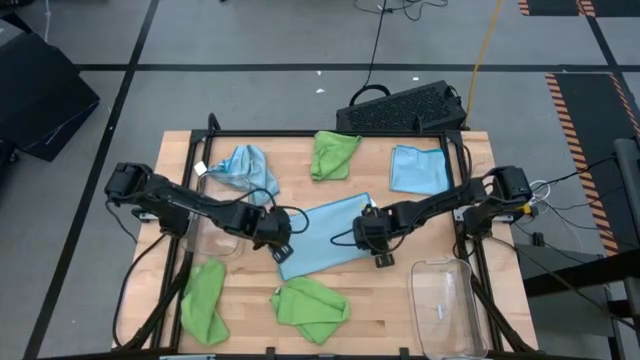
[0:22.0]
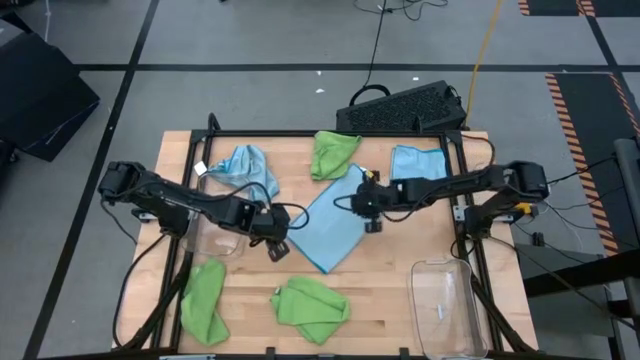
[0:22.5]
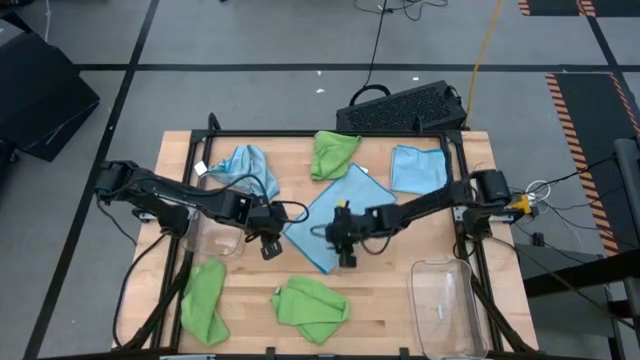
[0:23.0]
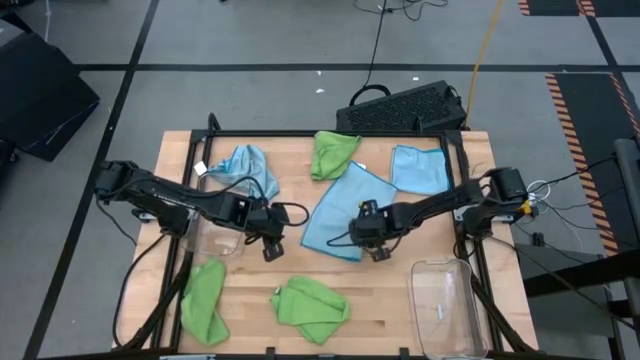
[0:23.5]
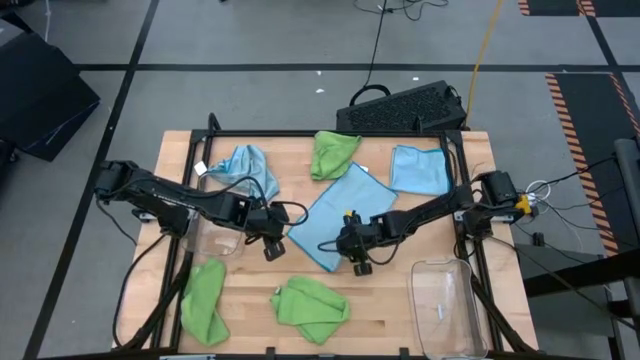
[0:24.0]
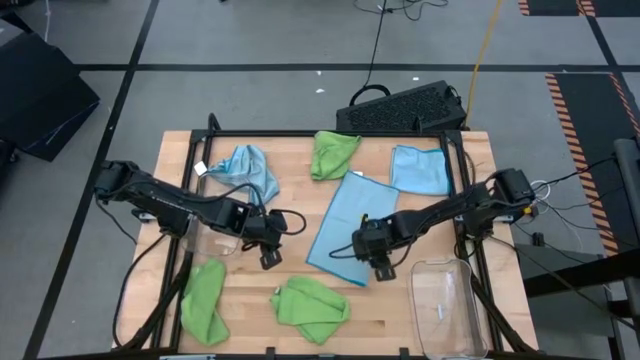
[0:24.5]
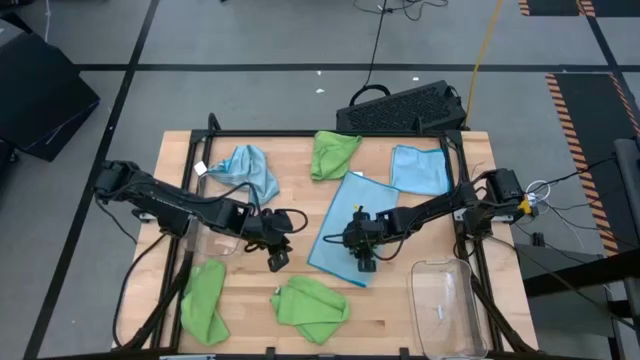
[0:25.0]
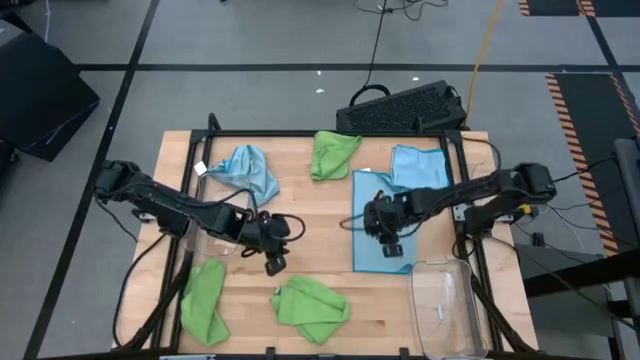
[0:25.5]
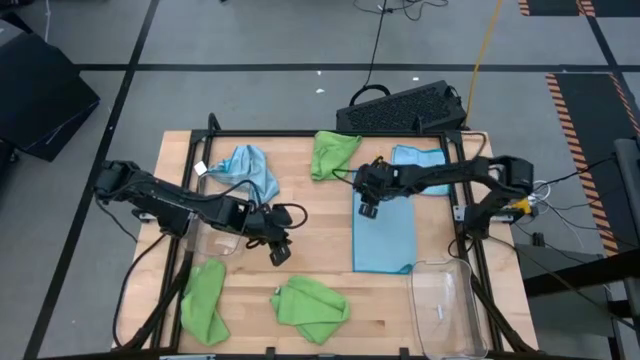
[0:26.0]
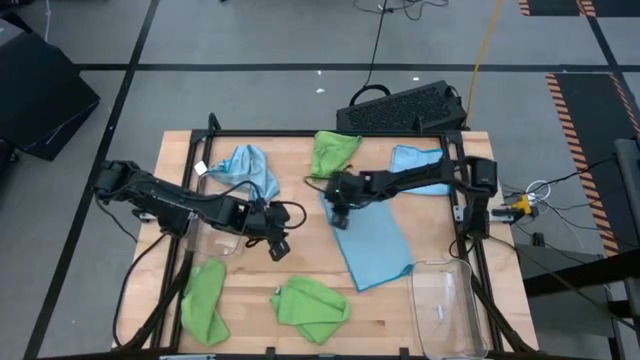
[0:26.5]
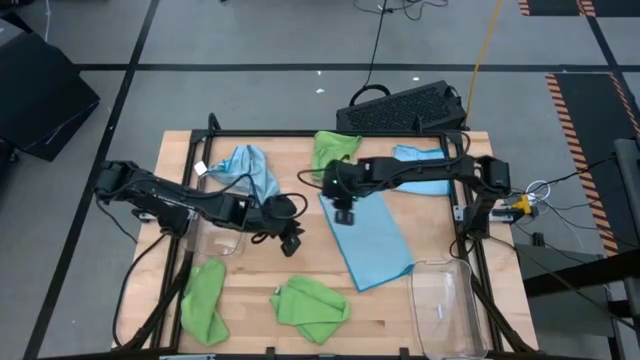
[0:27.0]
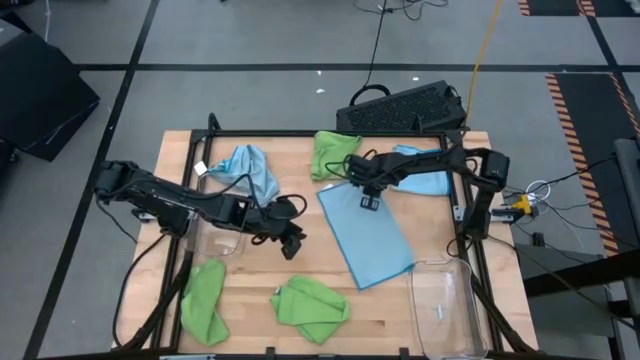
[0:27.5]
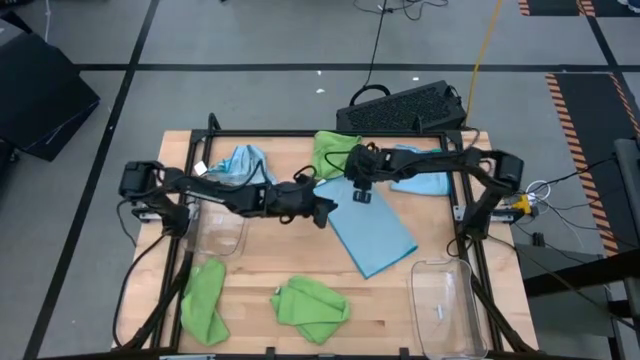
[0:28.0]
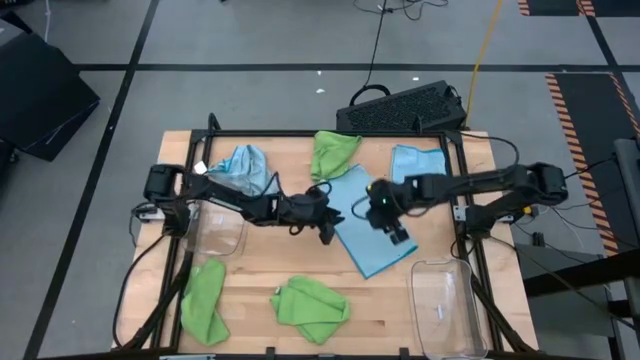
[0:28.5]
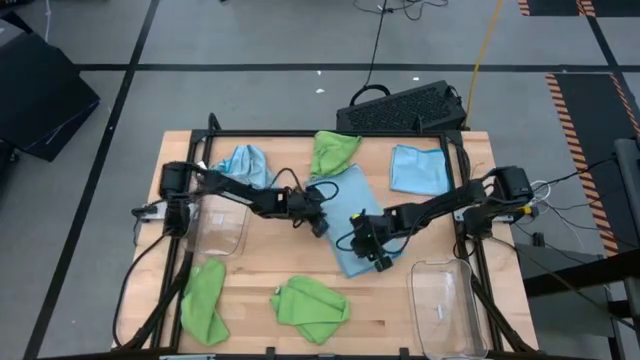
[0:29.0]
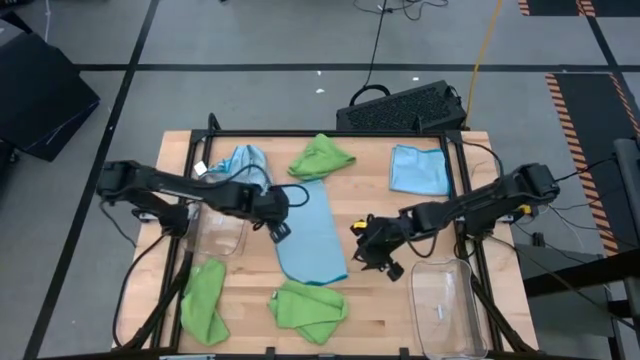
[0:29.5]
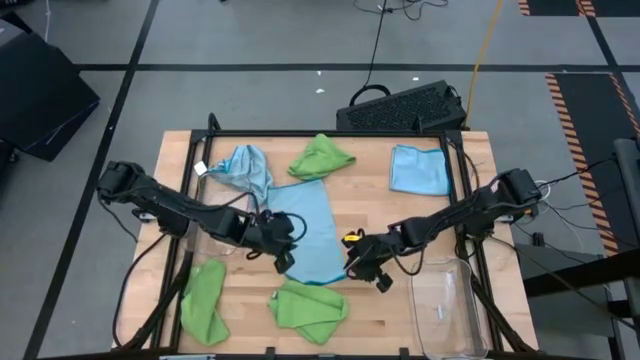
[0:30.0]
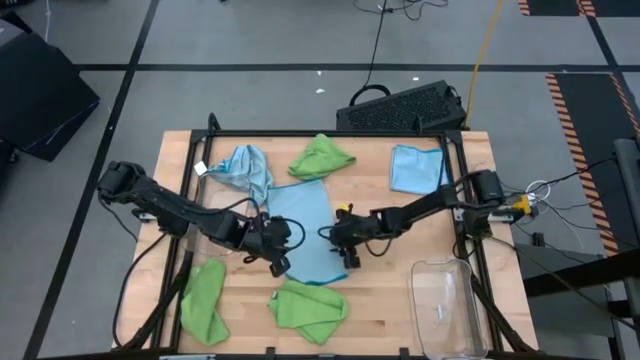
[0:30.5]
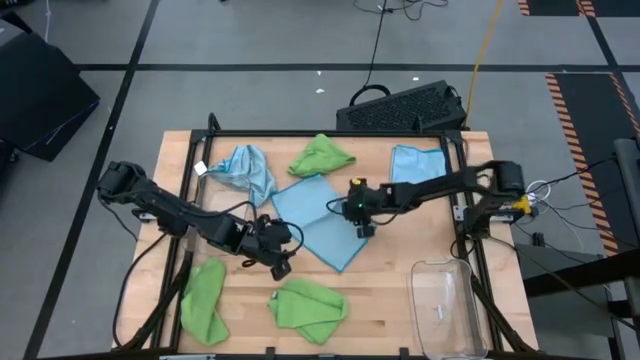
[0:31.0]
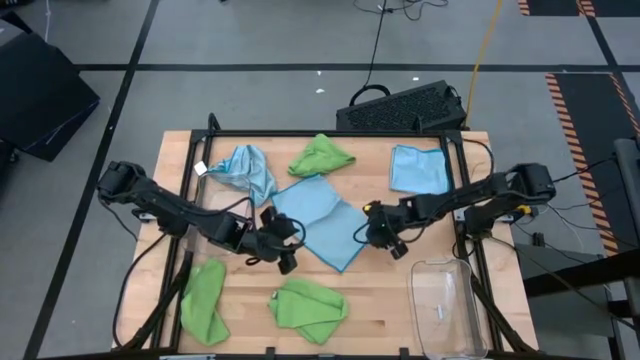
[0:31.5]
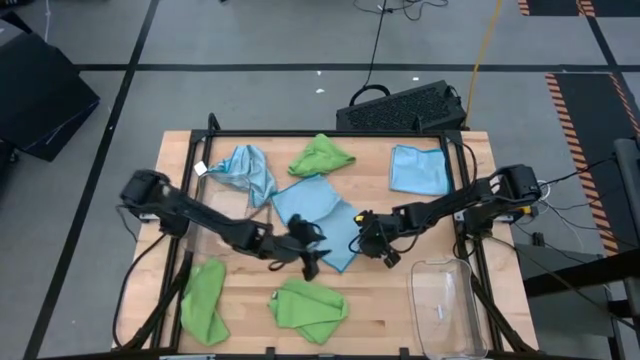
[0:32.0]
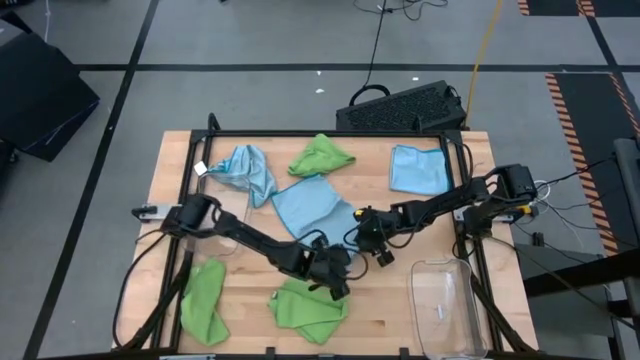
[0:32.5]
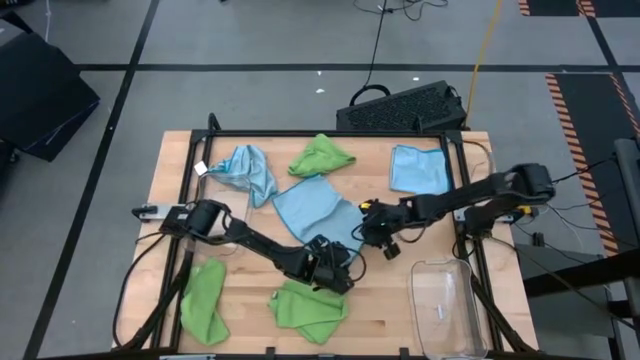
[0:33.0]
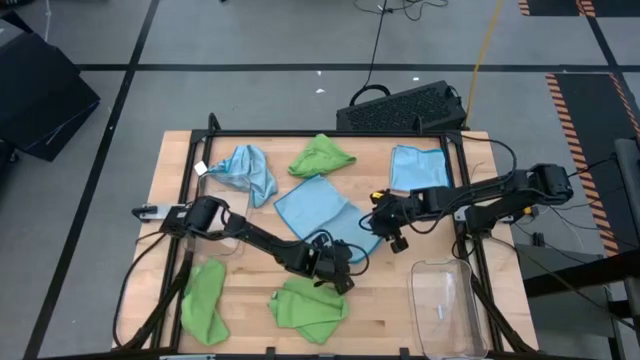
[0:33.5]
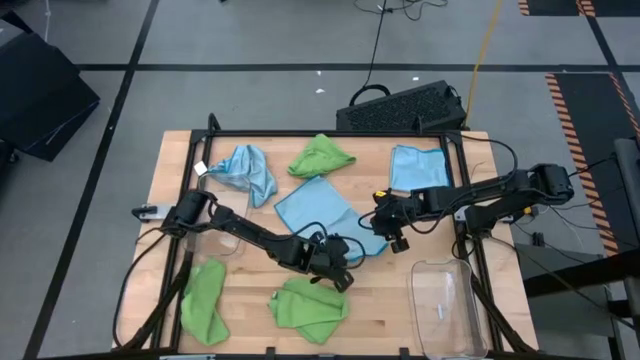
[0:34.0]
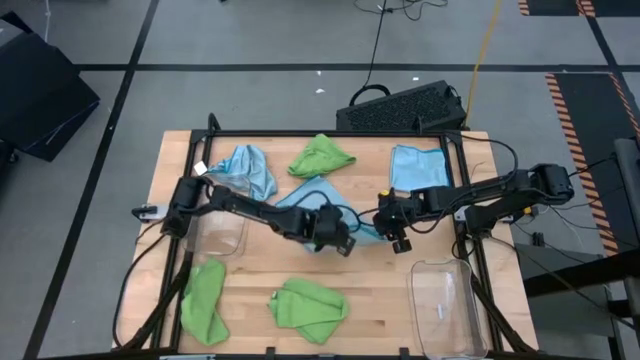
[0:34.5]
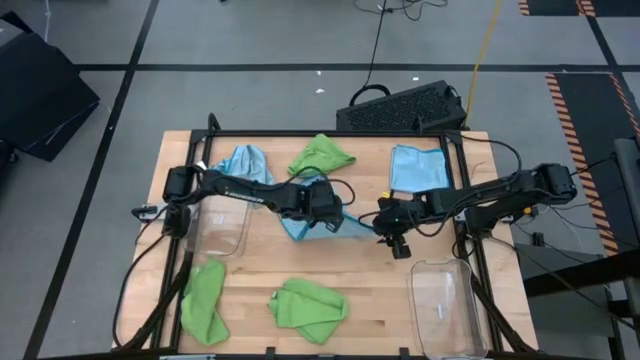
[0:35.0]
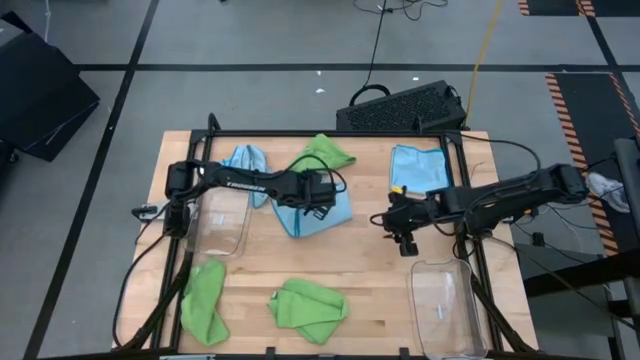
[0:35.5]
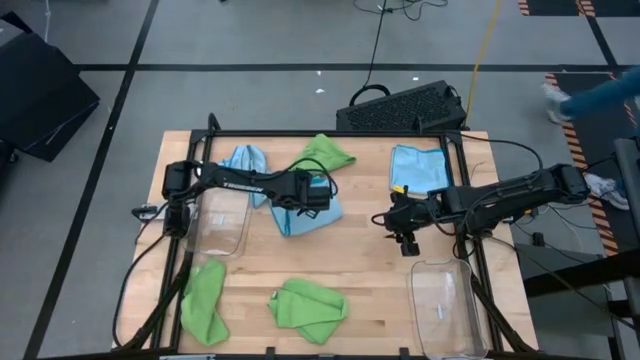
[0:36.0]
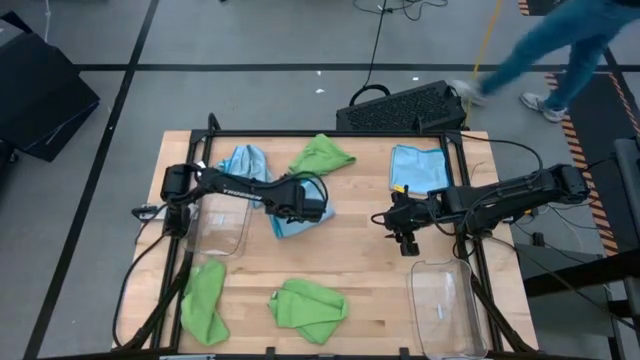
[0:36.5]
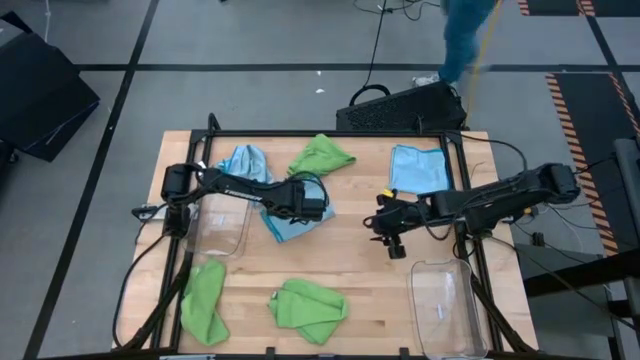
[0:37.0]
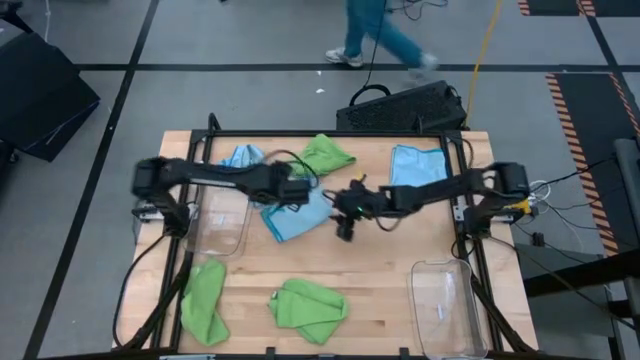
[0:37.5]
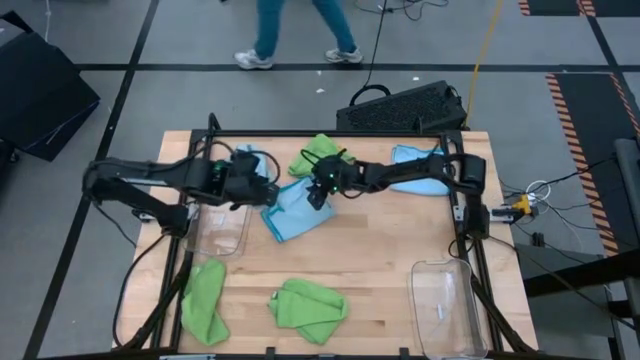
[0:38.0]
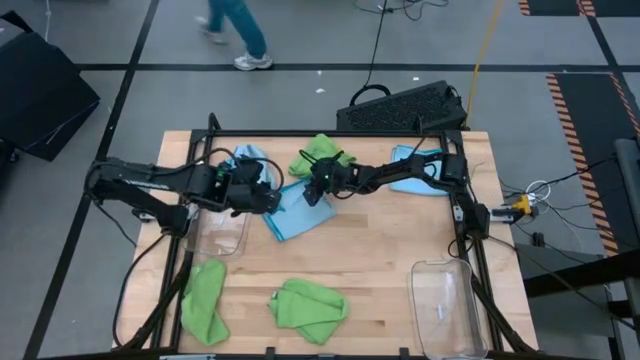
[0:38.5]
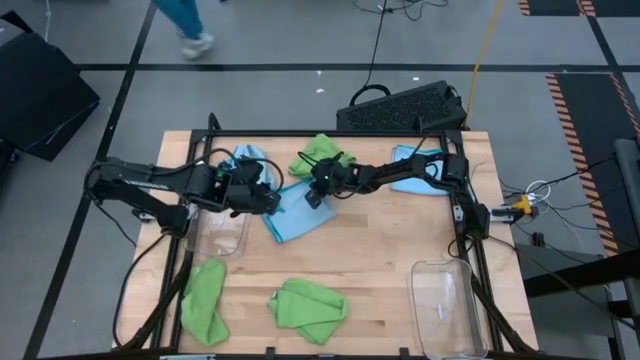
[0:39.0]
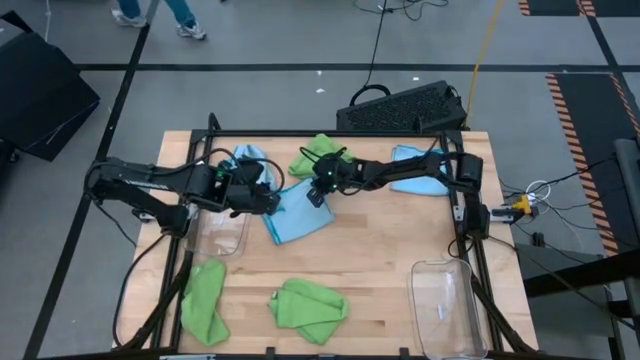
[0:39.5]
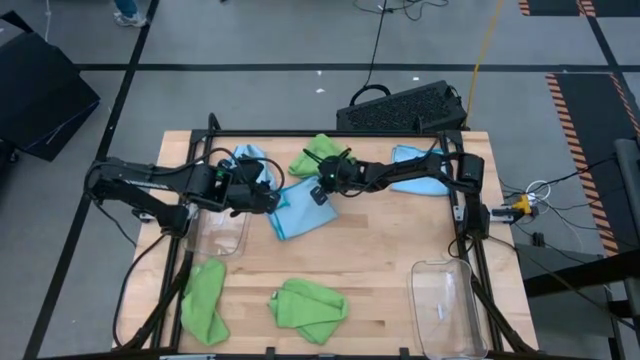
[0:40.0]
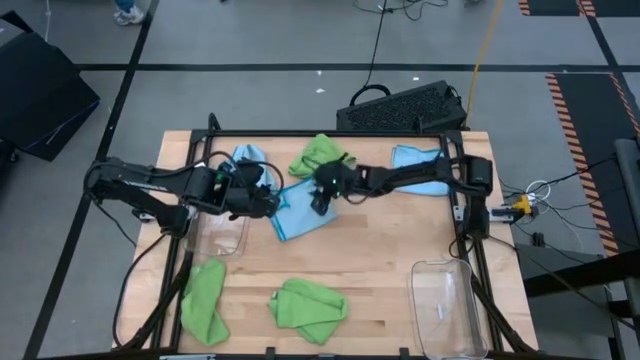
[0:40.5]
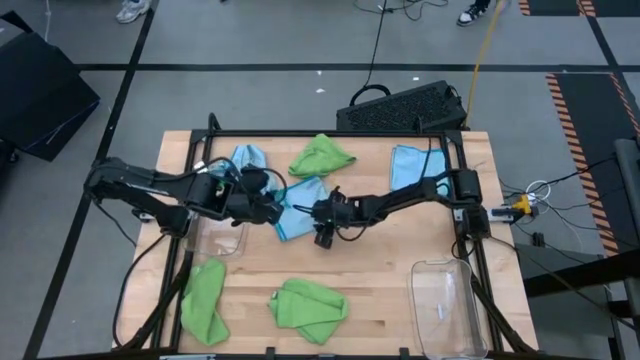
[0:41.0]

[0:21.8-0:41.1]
Task: Sort microfiber towel by color & place in baskets
Fold the bottom blue microfiber towel
